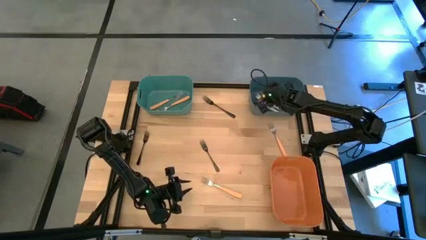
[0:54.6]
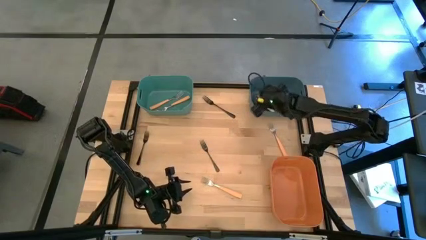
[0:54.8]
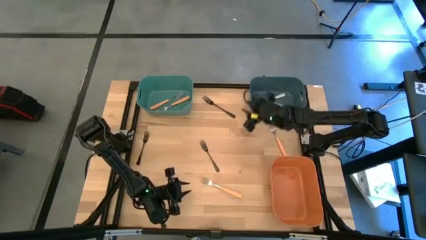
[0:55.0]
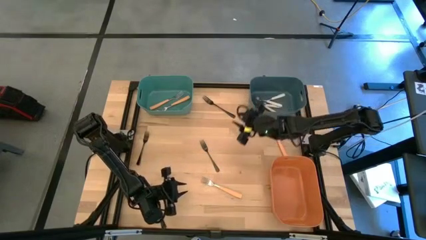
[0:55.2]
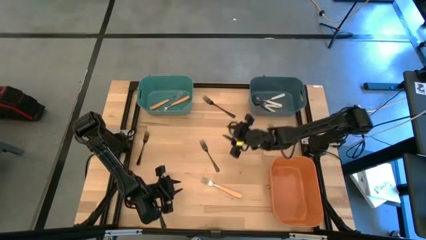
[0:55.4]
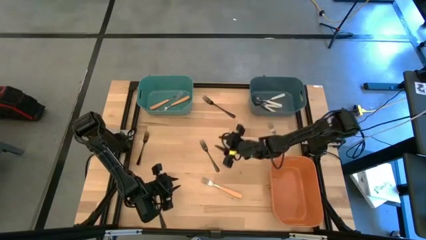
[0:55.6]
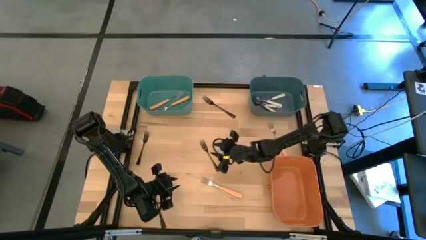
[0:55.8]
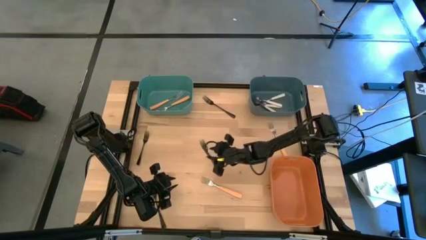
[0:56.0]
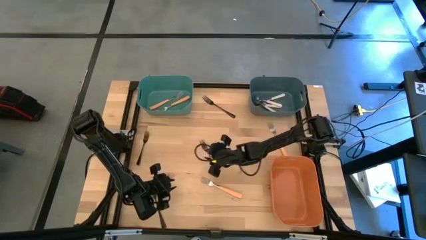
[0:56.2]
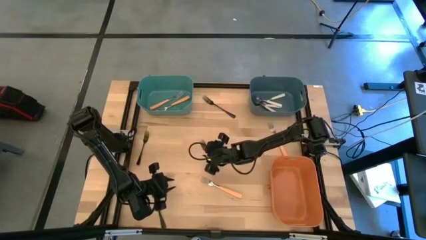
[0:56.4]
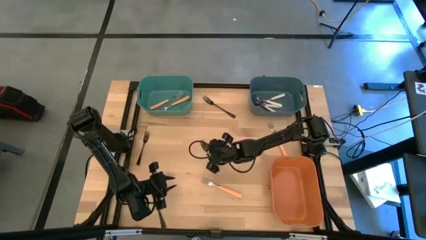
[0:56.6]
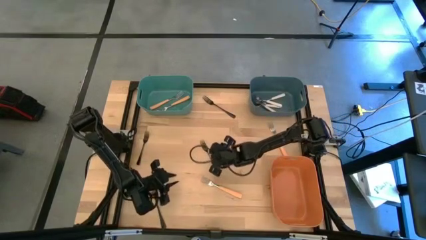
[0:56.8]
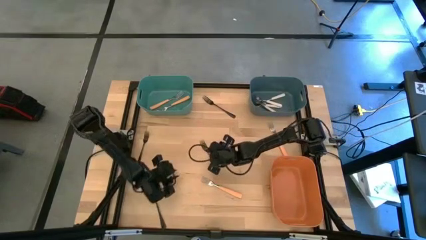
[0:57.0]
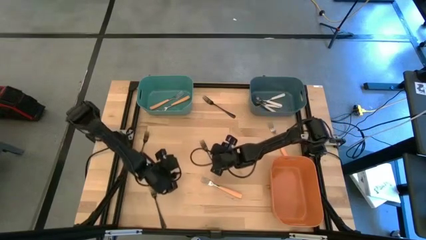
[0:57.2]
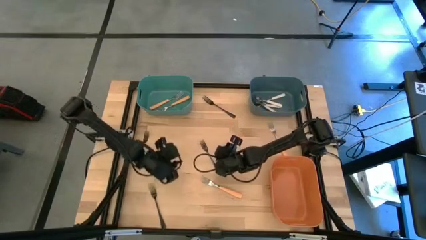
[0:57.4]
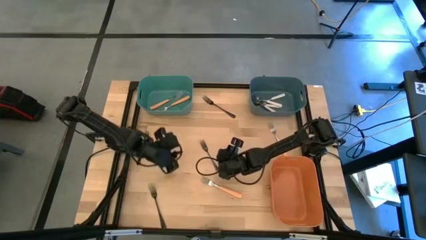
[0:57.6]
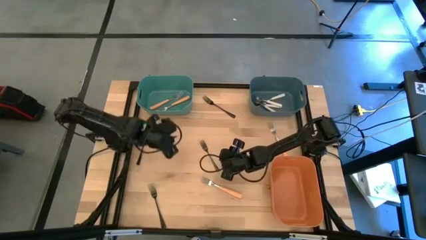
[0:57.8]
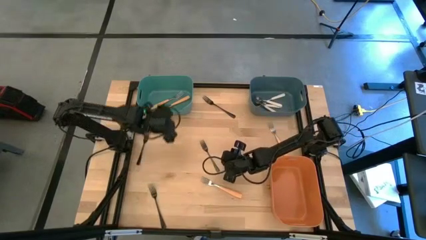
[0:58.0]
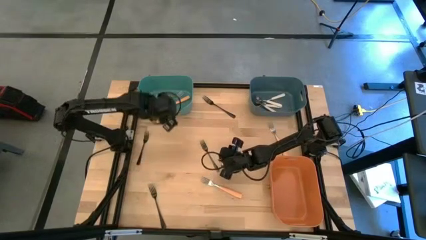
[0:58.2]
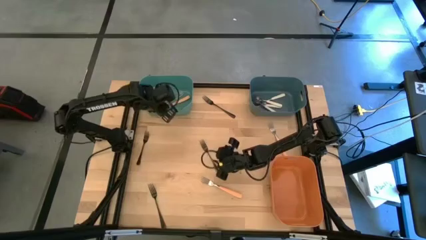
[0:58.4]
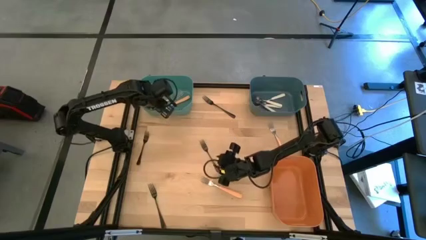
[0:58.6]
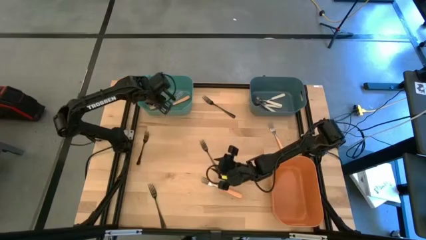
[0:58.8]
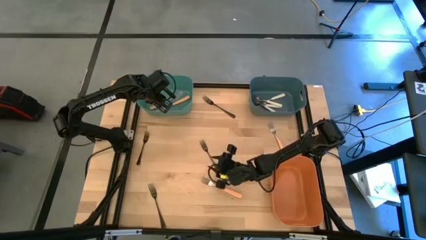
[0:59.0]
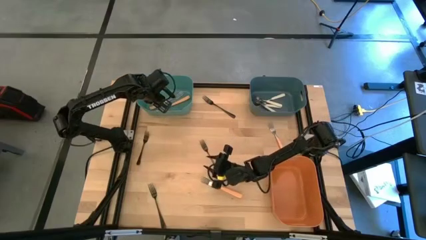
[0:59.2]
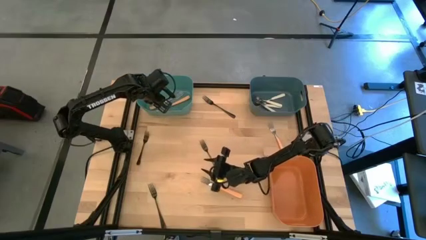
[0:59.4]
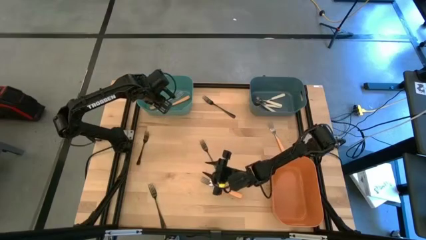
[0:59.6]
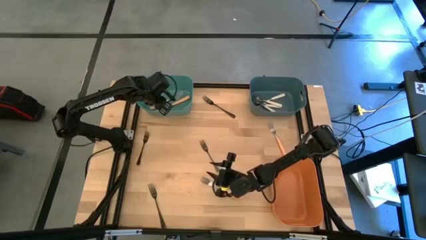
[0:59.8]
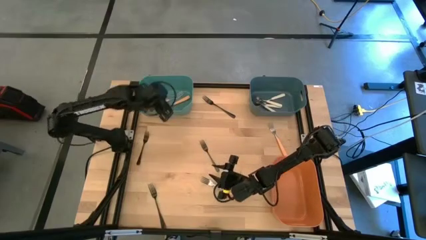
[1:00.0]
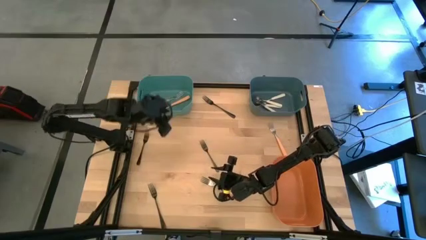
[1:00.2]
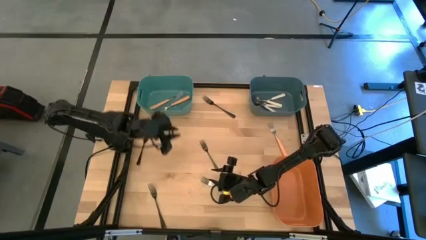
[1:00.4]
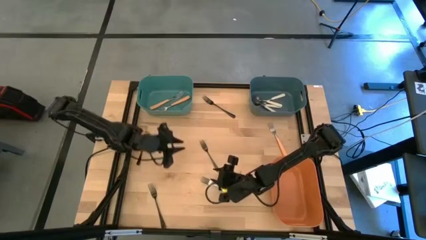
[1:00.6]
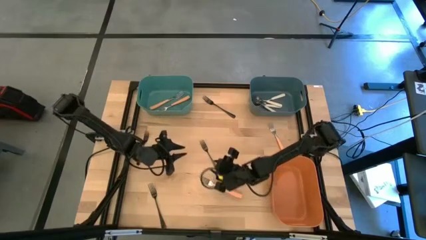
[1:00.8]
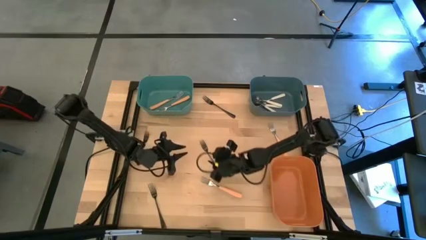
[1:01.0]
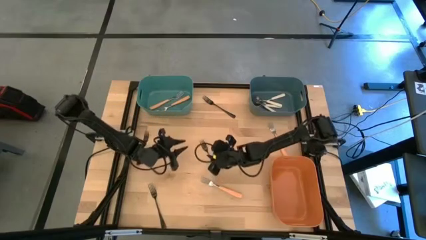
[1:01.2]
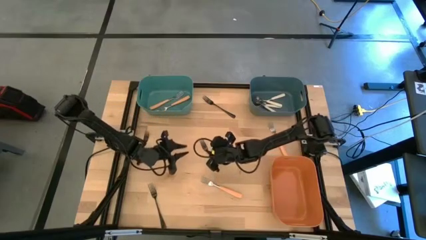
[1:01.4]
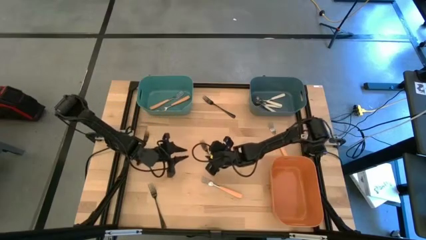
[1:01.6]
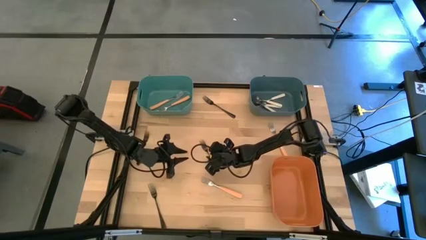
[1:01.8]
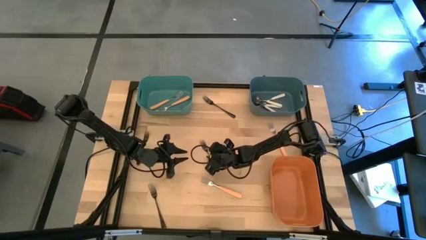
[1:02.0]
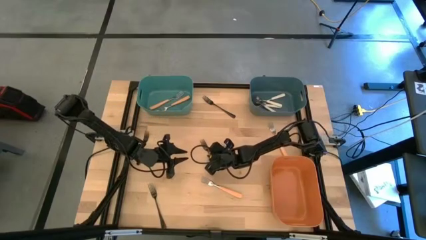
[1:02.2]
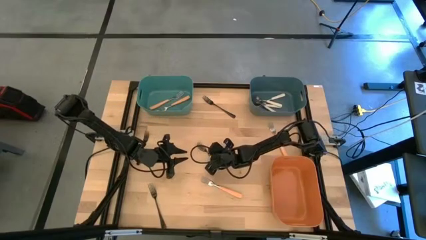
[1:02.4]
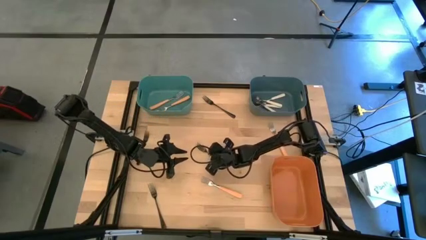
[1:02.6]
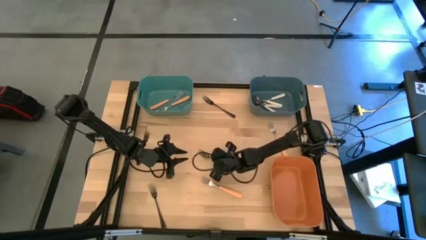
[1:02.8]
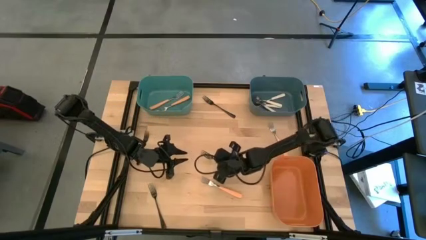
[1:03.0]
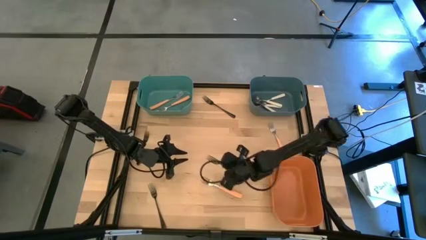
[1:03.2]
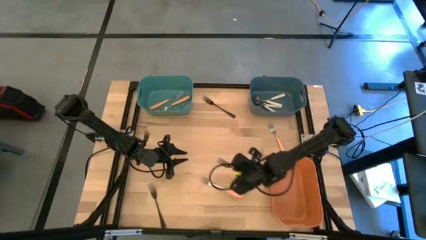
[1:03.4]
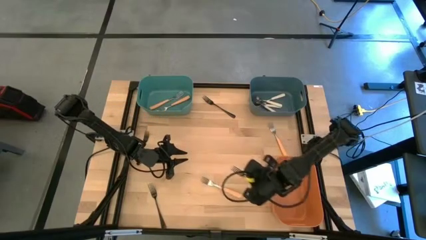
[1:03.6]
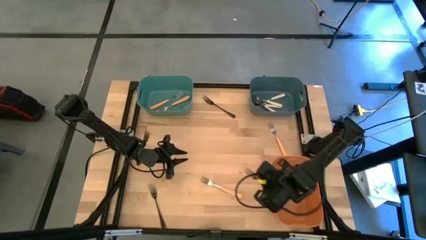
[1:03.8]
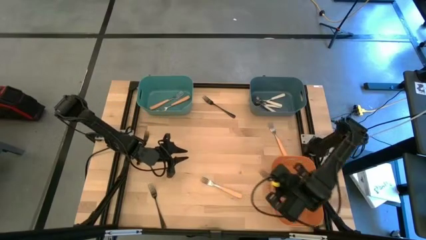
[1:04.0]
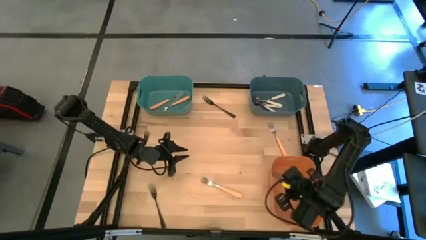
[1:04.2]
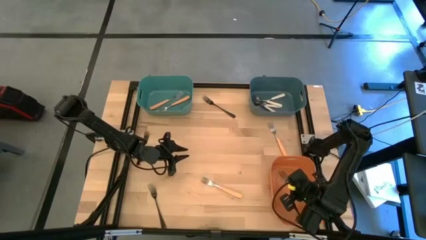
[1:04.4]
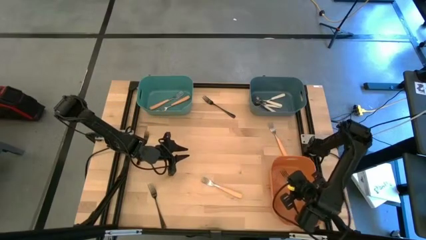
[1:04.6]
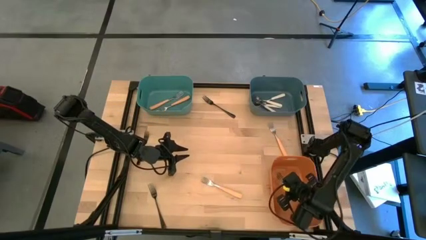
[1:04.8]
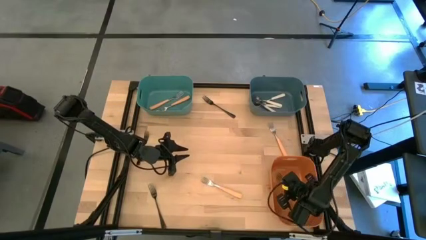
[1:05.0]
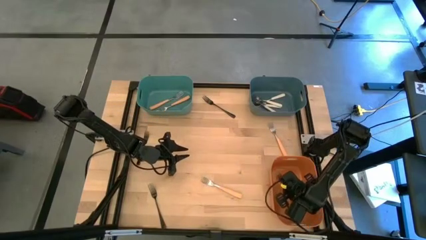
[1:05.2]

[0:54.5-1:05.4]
Task: Sort silverware by color (type)
Put the black fork into the orange bin
